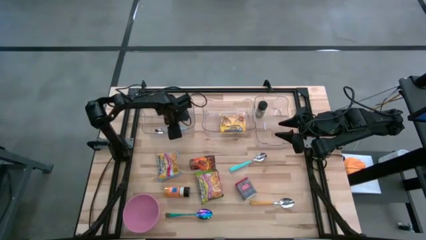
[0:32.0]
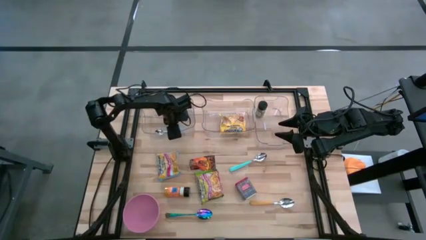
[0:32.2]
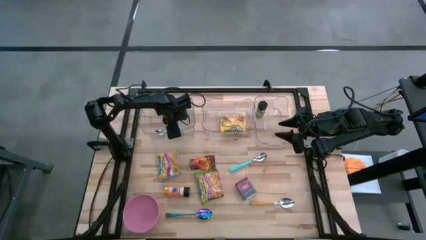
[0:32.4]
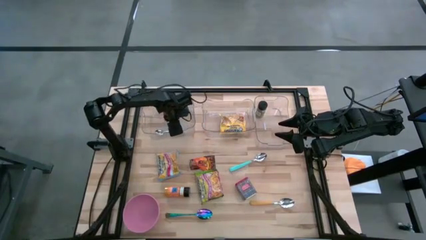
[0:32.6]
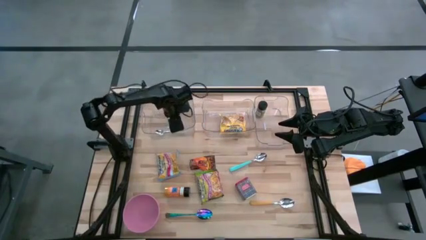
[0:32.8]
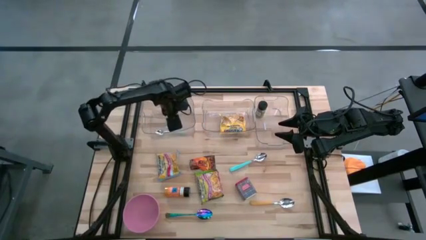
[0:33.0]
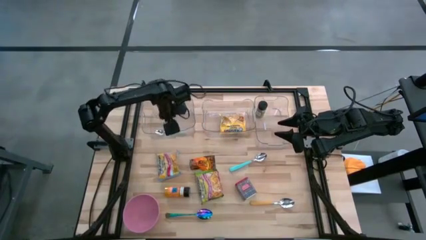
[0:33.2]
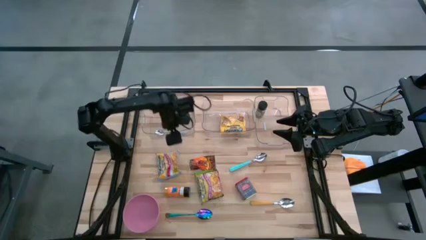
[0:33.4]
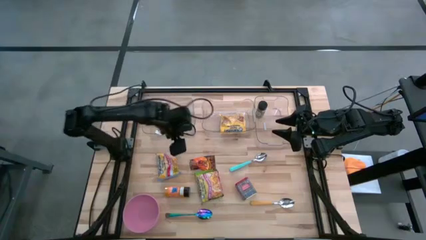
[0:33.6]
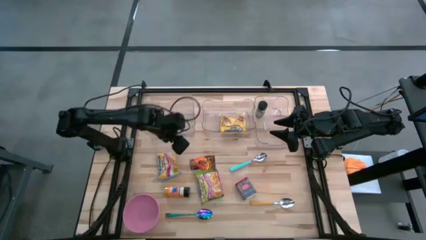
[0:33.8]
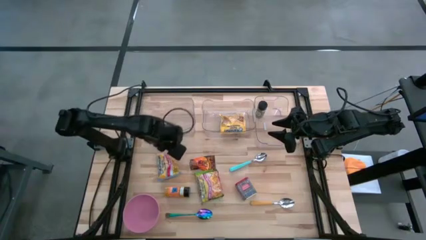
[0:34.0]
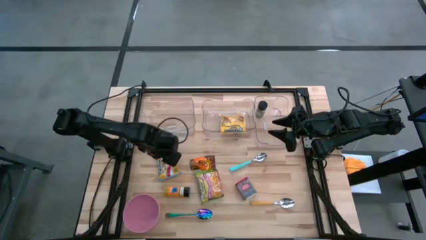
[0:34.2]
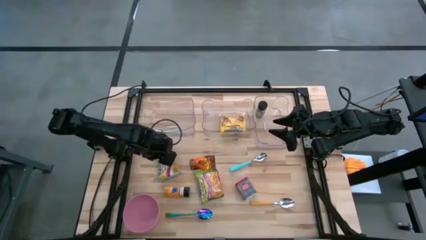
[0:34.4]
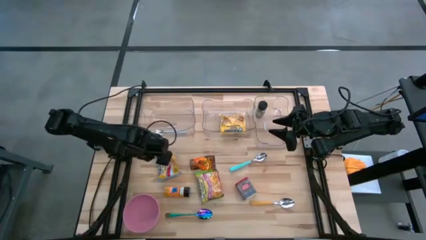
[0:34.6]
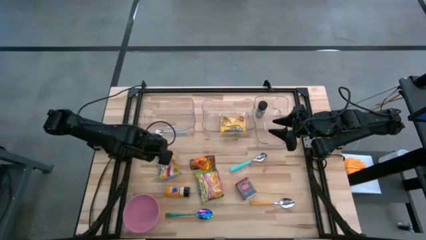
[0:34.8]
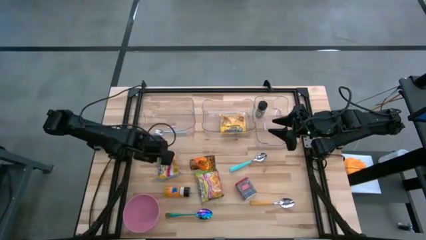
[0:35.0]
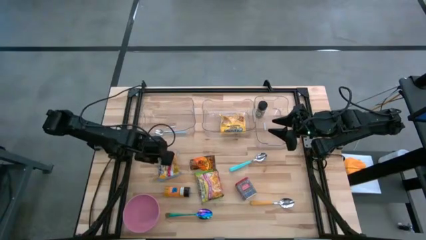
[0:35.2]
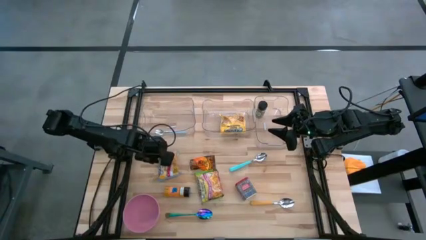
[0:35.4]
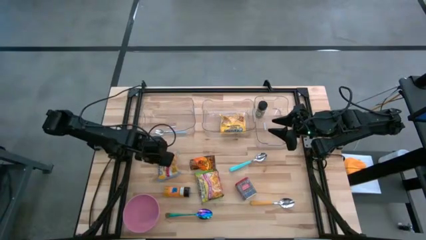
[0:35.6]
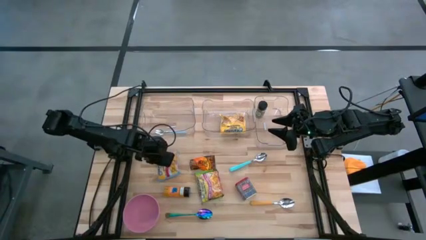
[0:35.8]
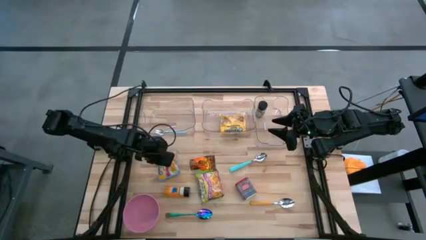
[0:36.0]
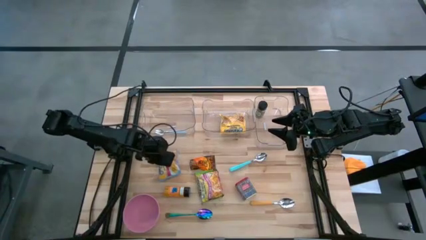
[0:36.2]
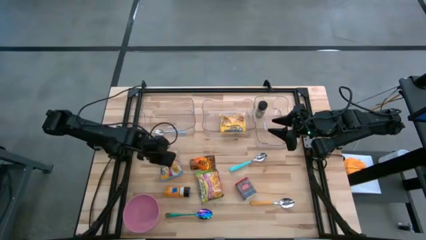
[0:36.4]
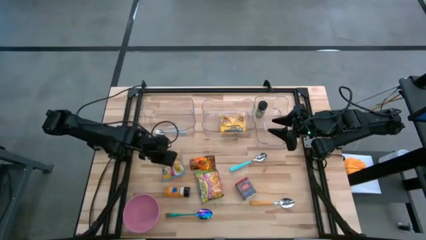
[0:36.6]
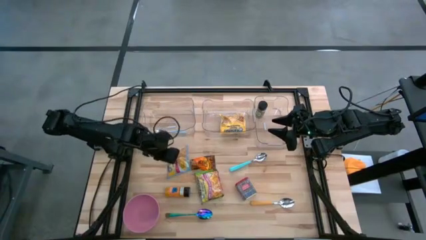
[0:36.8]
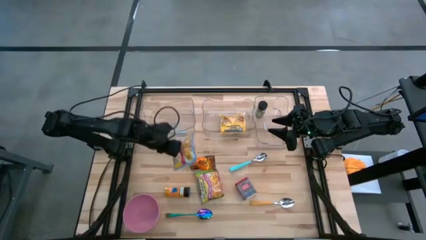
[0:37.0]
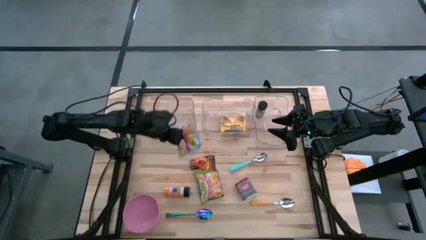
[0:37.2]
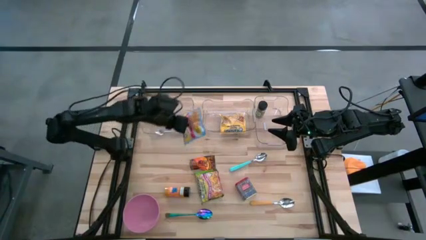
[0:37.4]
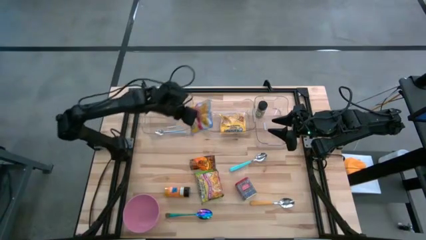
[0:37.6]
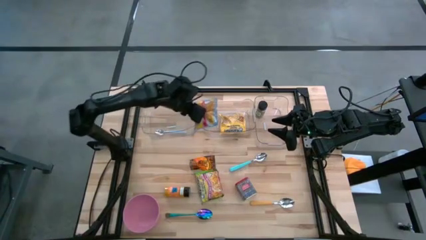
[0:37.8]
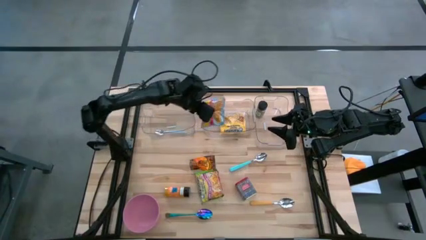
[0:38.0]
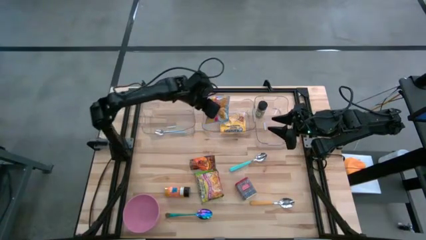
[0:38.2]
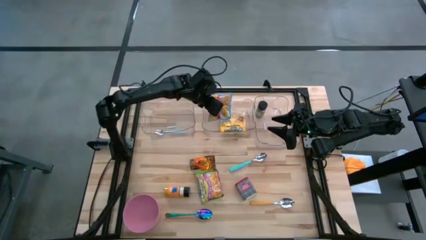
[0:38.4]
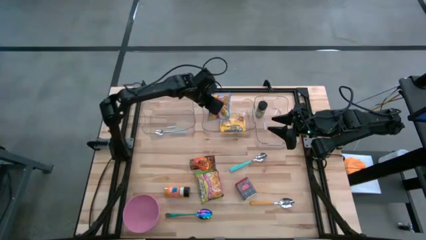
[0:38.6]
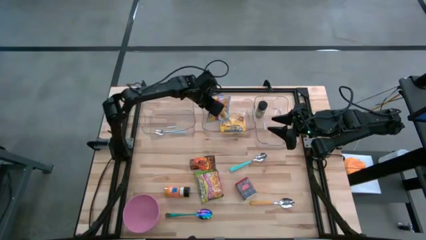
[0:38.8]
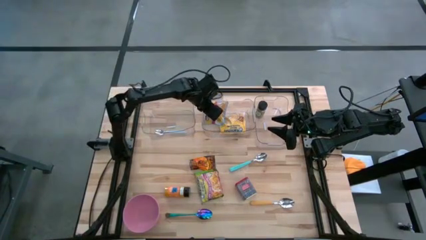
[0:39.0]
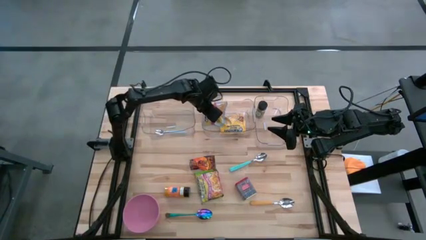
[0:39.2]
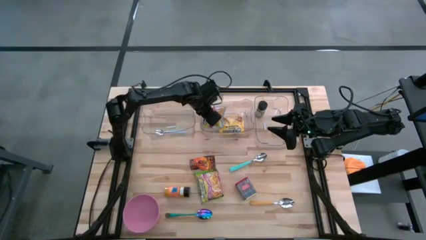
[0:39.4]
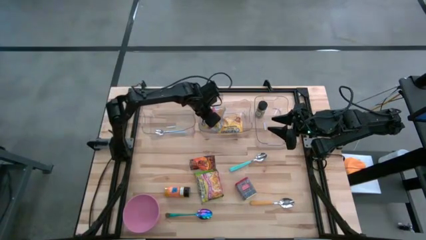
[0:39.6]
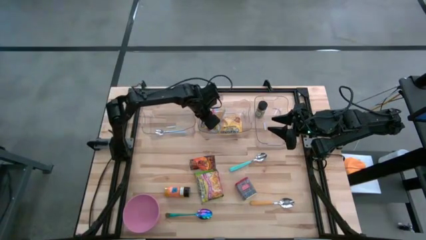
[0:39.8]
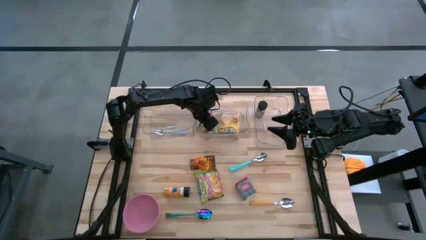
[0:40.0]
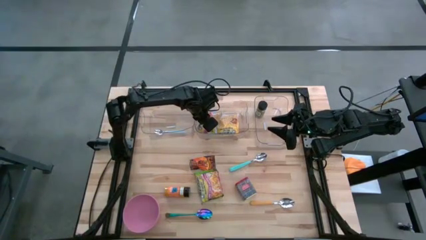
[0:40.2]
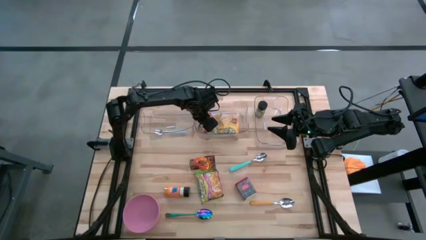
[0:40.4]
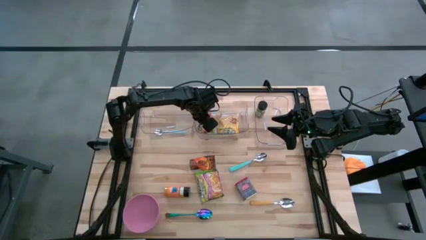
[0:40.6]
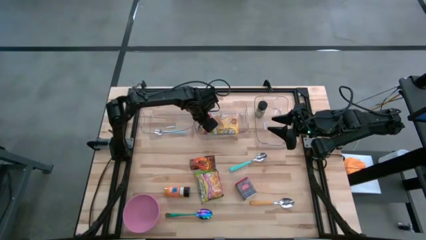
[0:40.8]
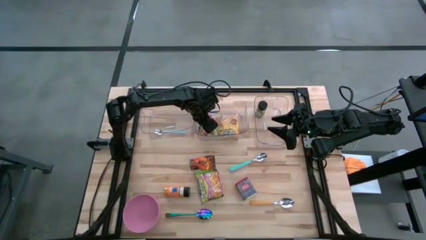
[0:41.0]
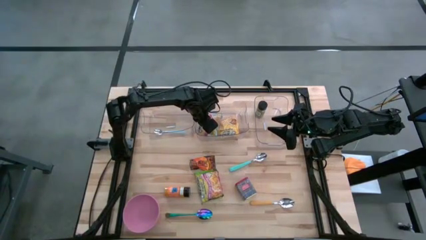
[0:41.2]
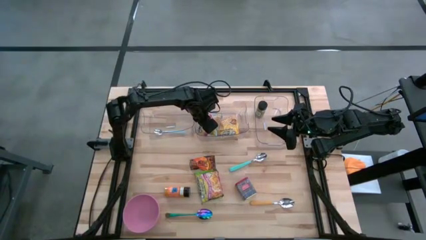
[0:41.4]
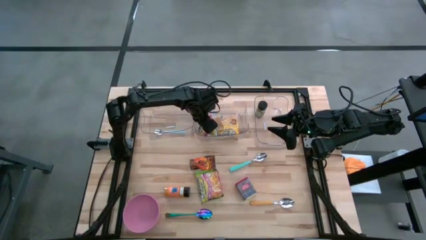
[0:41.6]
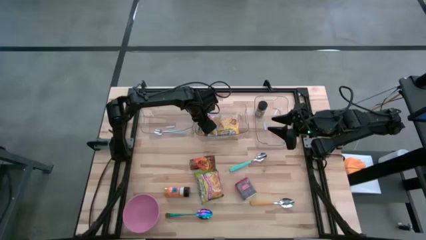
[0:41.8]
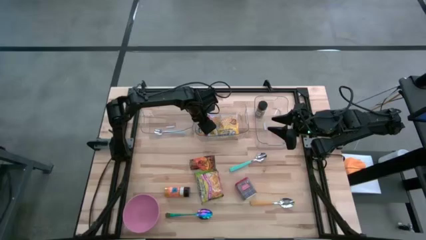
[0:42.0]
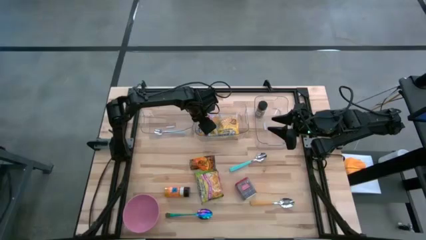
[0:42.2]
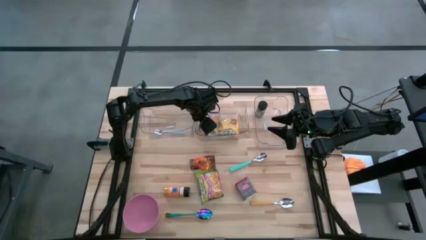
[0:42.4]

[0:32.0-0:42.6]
Put the blue noodle pack into the middle transparent bin

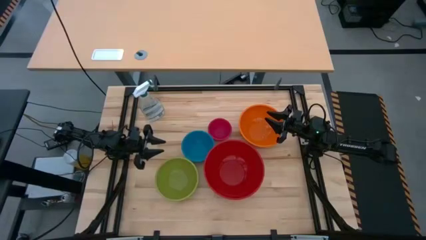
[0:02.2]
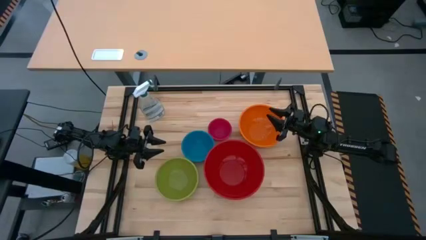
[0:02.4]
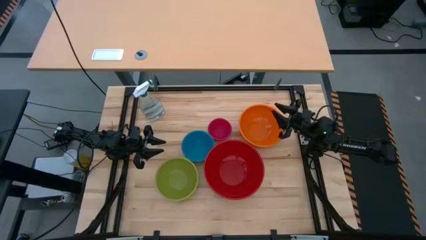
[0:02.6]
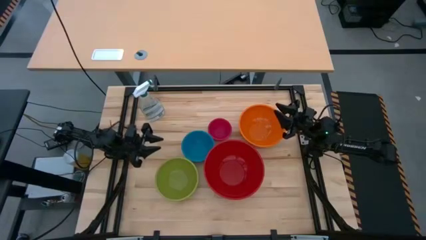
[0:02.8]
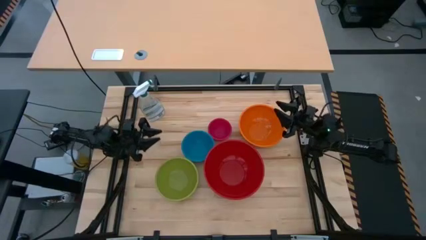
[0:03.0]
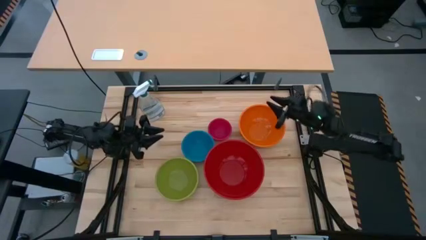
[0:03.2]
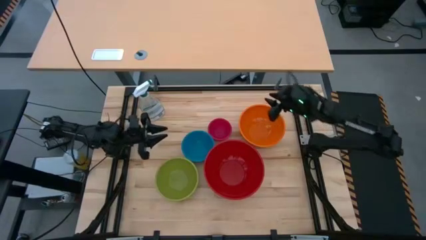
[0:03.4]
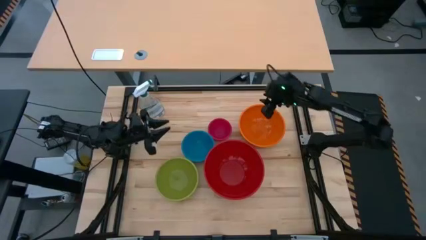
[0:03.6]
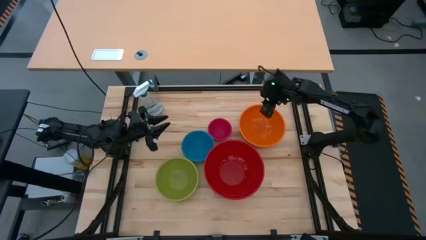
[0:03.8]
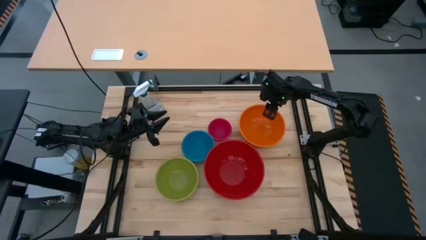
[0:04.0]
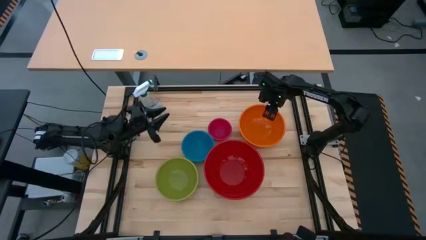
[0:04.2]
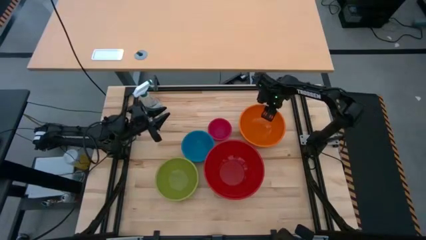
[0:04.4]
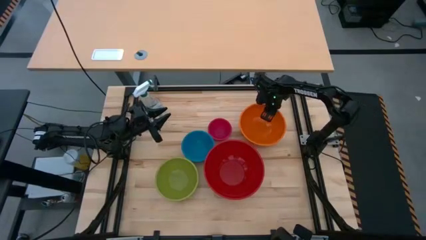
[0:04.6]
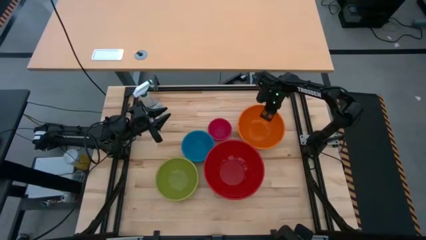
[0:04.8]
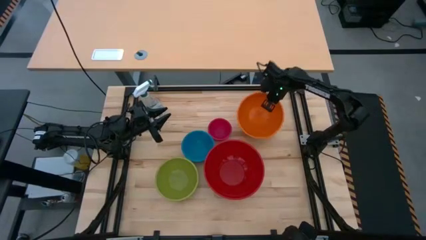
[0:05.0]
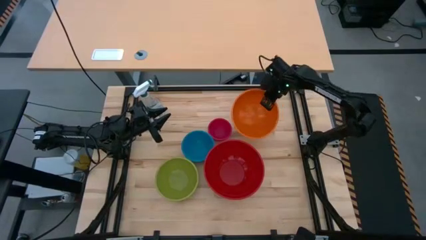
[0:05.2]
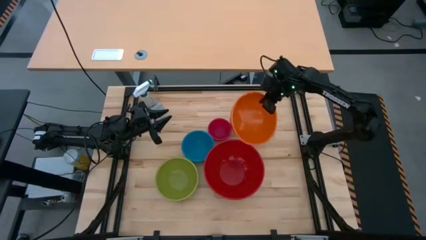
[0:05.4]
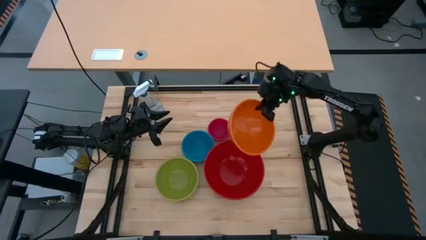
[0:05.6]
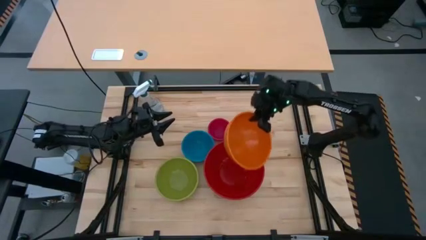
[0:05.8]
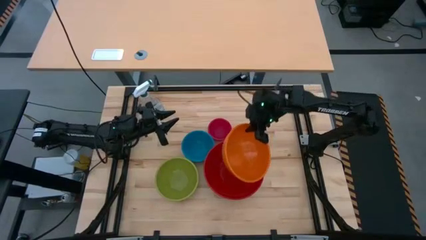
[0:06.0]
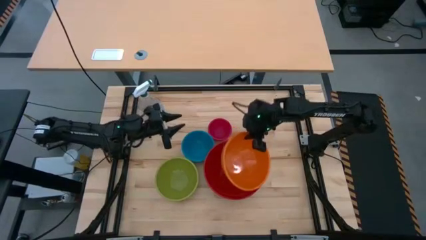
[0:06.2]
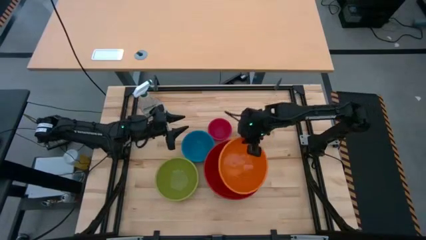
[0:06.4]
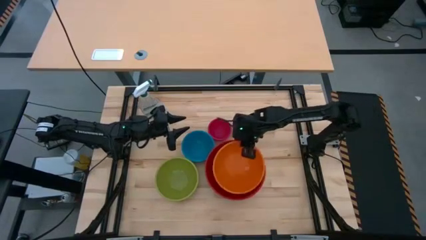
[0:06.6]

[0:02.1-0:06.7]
Stack the orange bowl into the red bowl

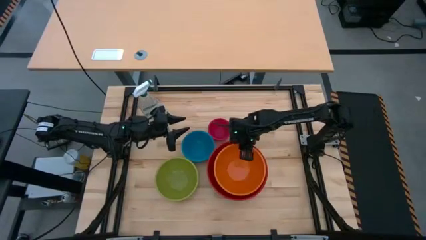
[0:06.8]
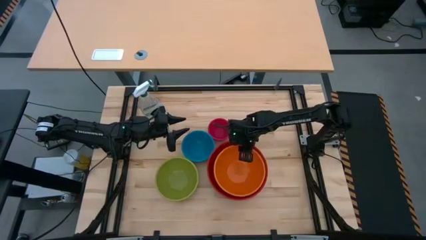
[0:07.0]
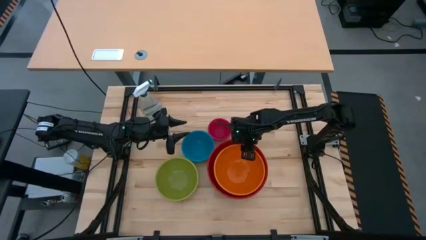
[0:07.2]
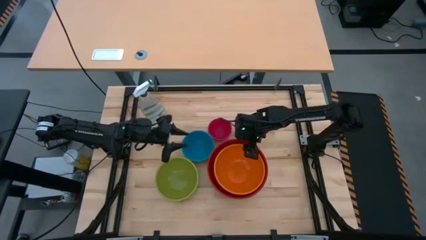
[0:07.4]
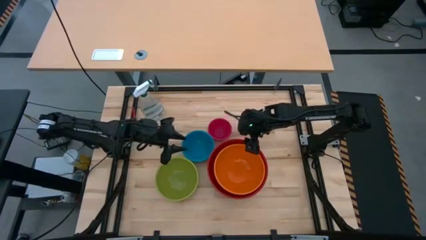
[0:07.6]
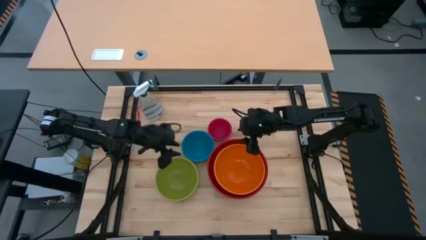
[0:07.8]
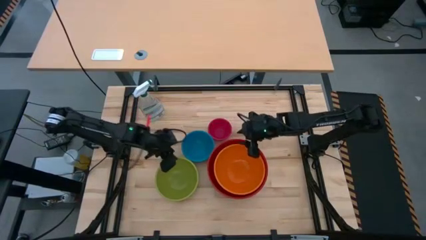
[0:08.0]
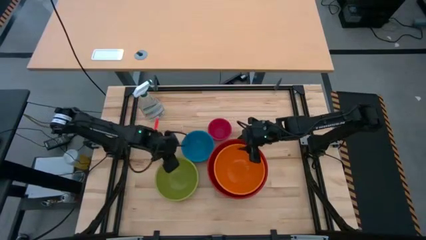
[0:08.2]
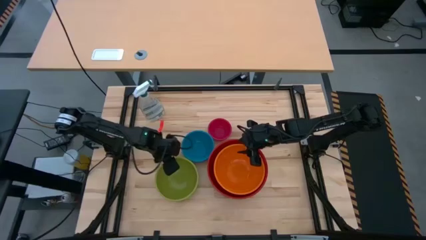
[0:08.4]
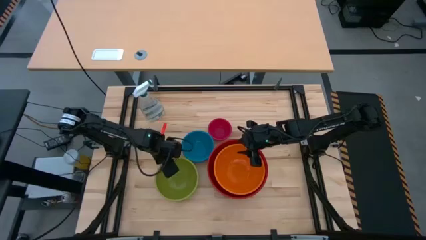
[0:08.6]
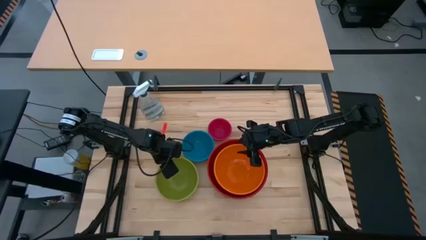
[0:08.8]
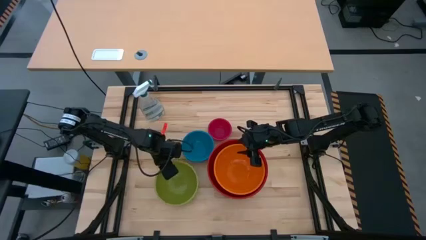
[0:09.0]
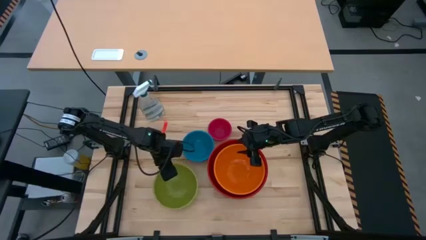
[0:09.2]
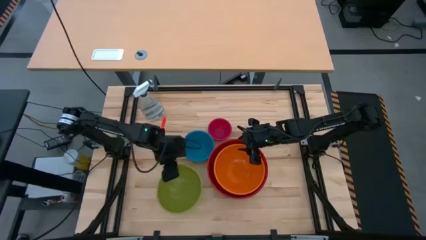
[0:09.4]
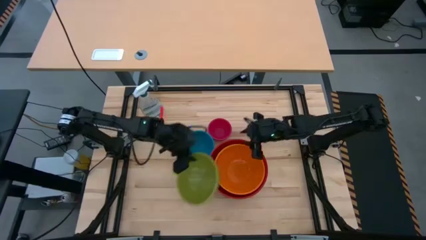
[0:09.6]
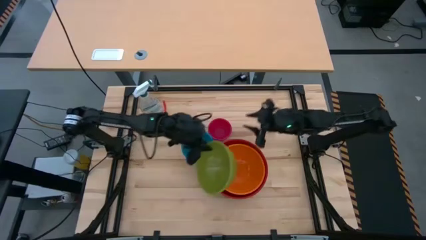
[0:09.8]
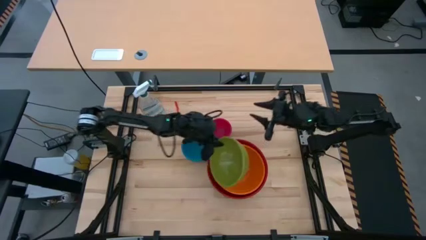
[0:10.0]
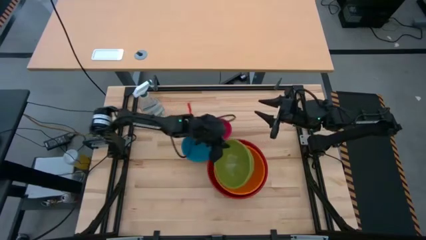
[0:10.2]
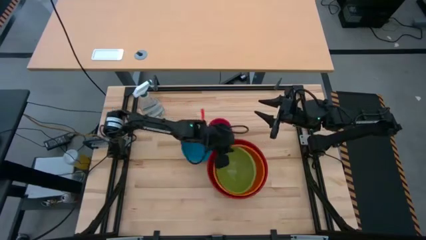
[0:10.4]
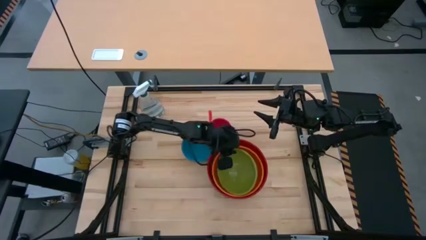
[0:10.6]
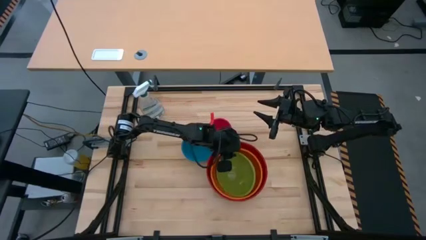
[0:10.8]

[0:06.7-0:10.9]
Stack the light green bowl into the orange bowl
